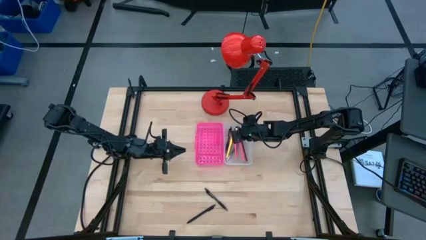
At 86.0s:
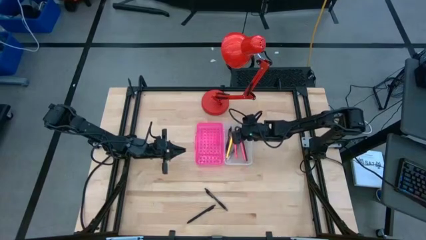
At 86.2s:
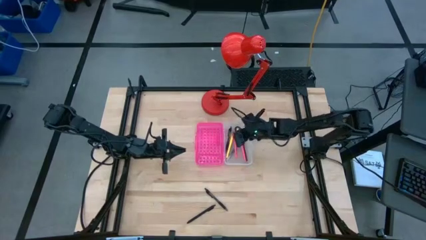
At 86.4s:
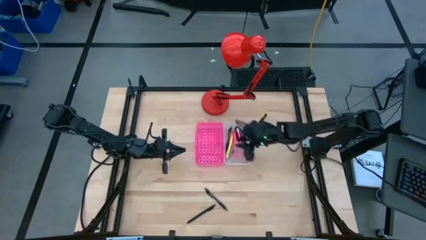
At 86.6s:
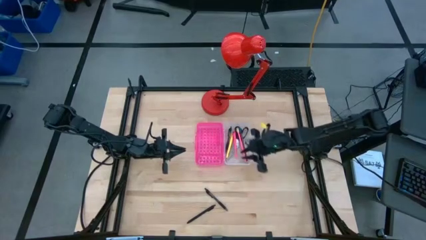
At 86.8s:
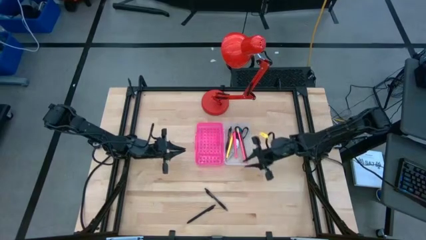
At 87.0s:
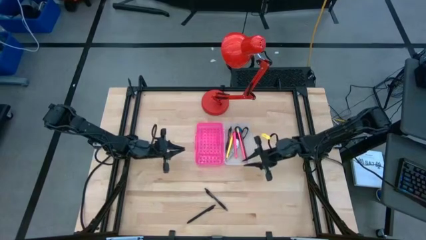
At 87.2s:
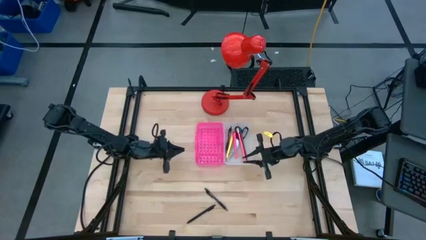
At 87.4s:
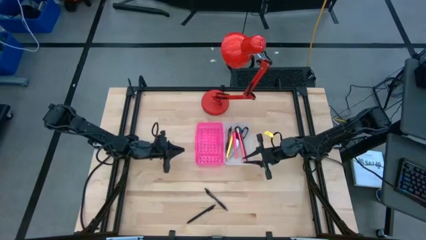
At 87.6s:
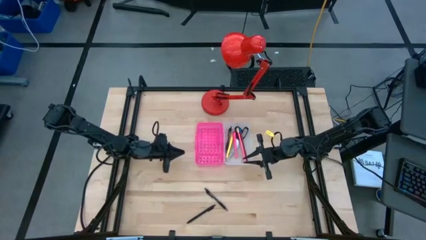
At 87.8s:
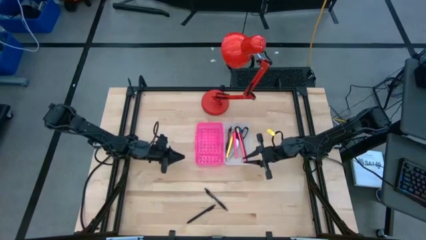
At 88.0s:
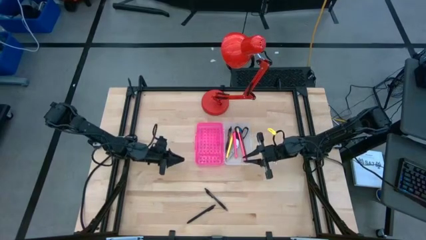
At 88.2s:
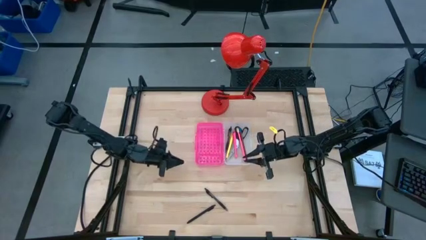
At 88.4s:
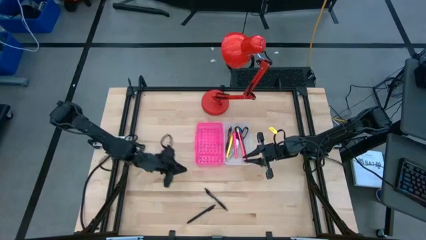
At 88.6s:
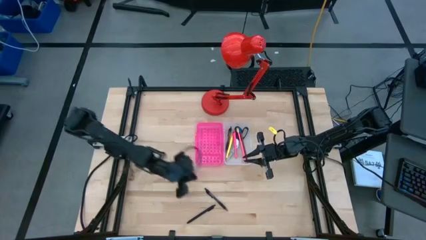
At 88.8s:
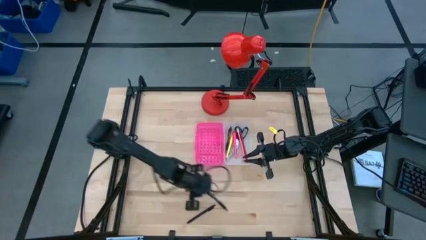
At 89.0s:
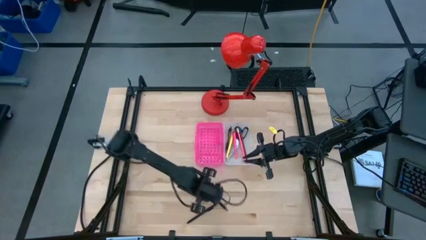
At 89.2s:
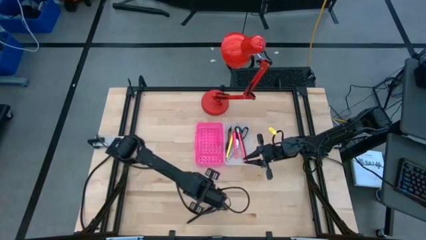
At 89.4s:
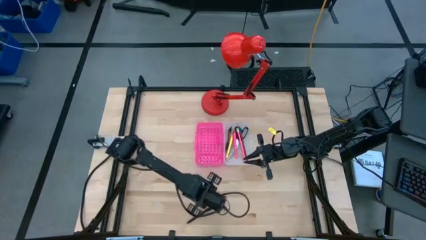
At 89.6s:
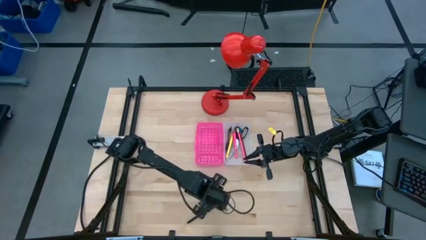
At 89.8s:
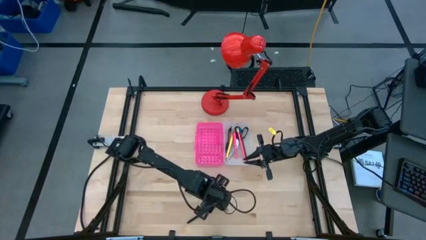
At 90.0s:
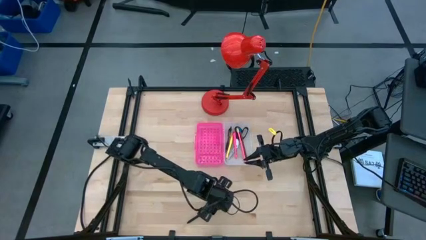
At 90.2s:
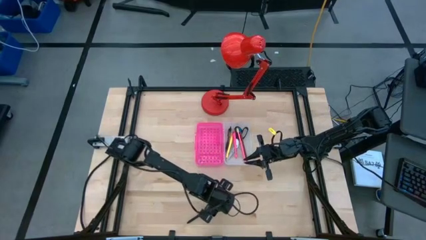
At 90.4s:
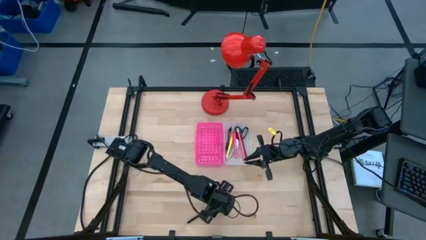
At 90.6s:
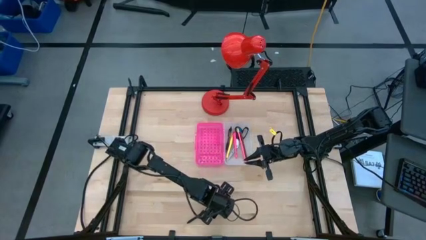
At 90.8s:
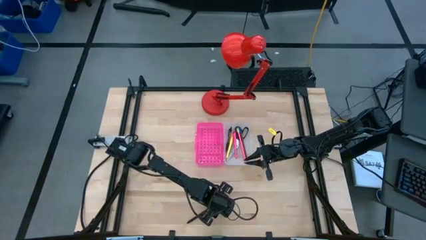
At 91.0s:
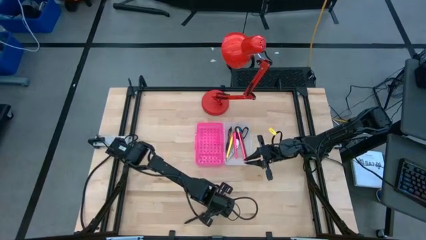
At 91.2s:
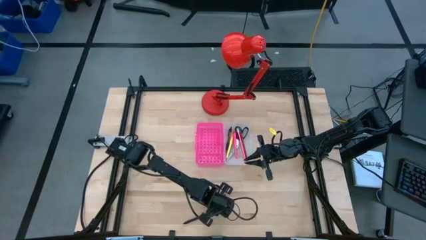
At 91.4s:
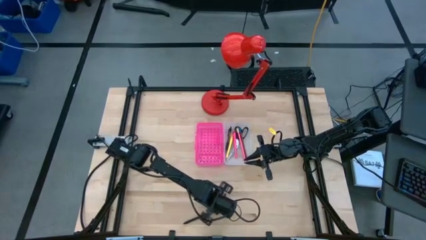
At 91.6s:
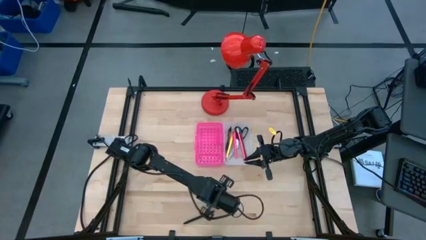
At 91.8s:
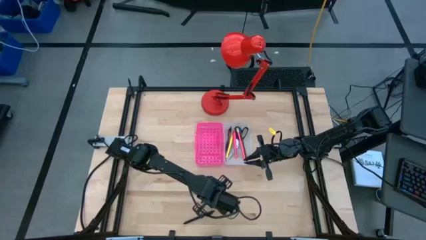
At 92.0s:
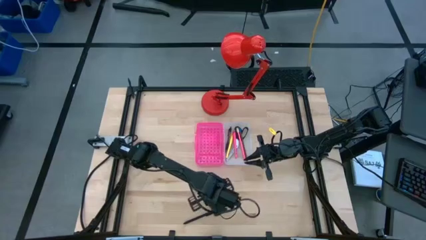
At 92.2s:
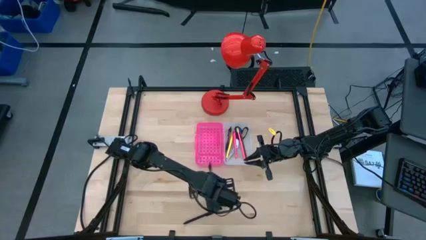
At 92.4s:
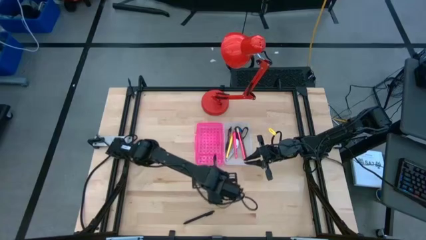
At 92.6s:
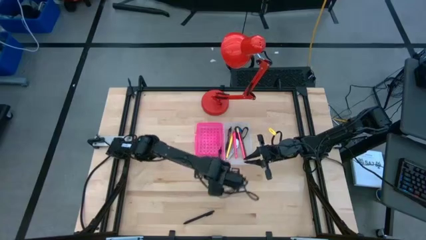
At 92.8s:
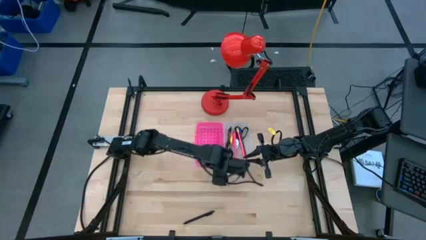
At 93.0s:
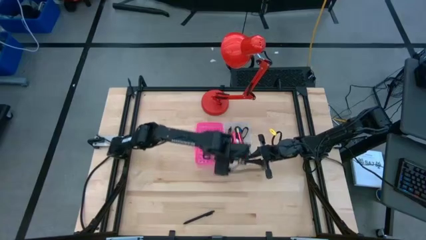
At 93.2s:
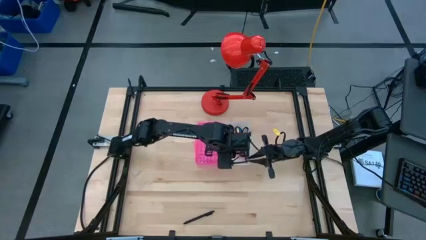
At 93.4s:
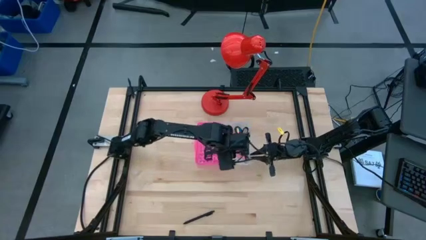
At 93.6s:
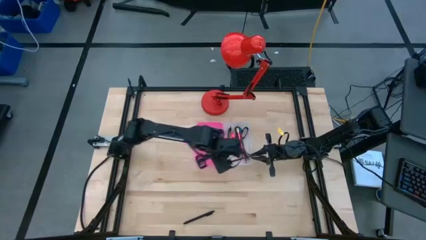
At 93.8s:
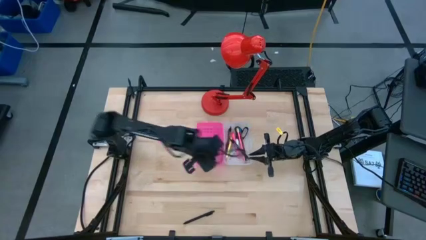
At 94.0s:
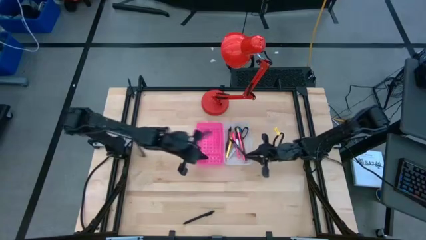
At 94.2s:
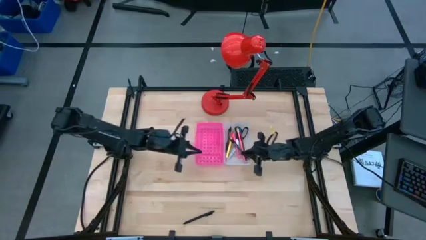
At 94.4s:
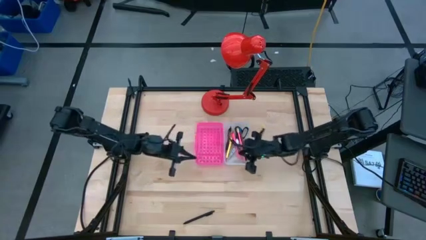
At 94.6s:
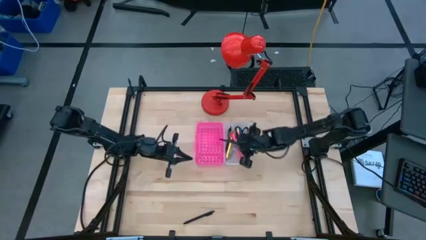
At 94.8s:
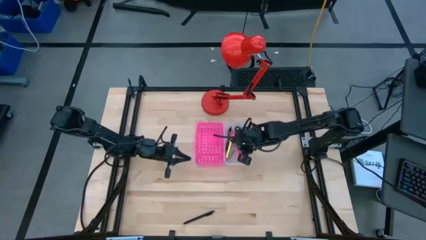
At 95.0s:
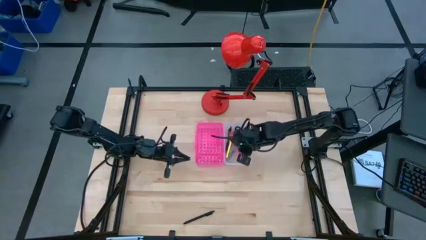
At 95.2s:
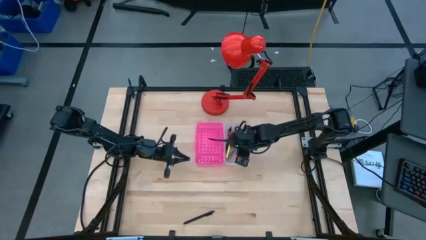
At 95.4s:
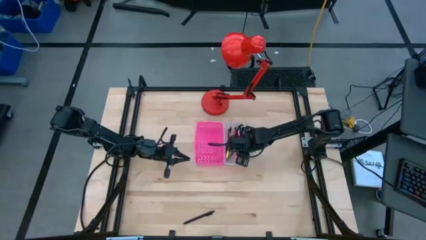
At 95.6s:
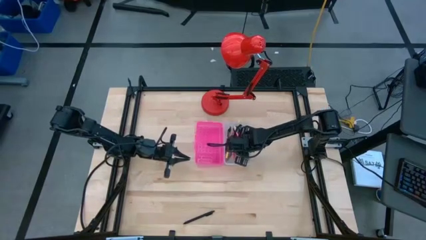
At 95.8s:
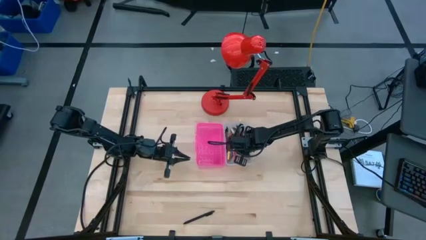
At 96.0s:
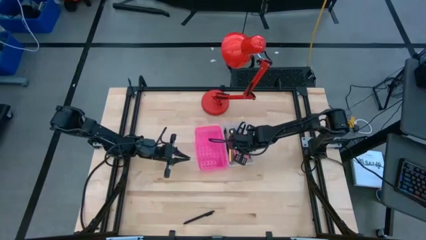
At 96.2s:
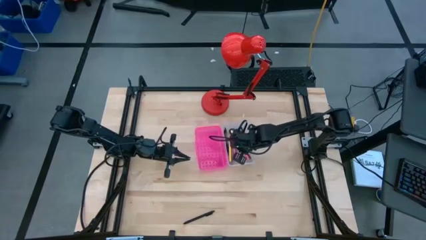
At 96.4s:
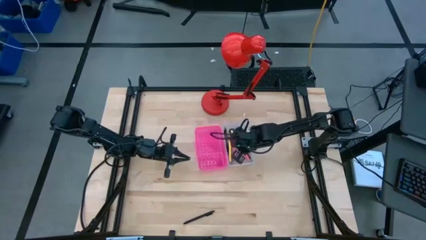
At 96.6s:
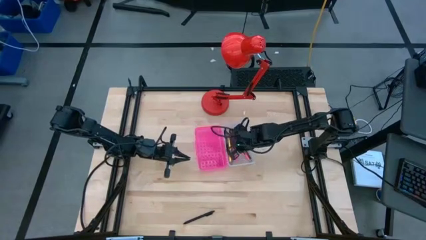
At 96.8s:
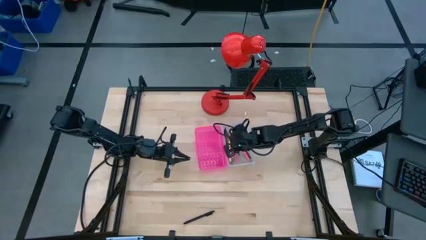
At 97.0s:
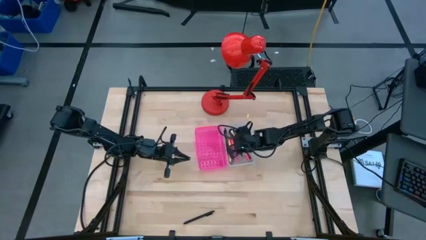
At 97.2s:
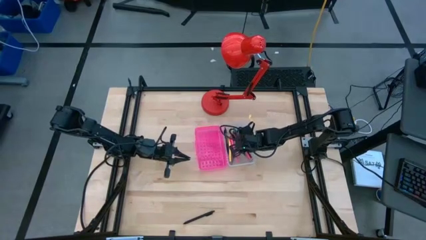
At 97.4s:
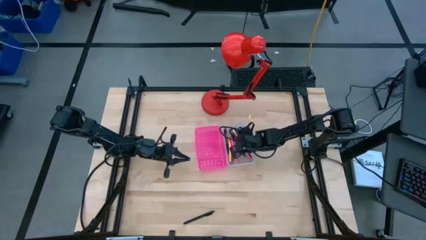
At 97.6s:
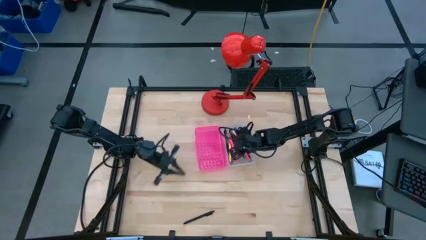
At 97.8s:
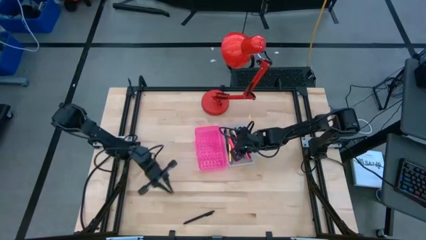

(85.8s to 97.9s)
Task: Pick & place school supplies into a supply box
Put the black transparent pen into the pink supply box

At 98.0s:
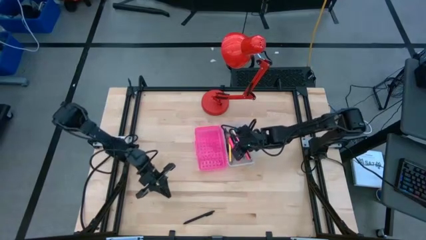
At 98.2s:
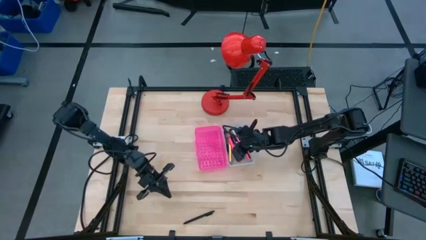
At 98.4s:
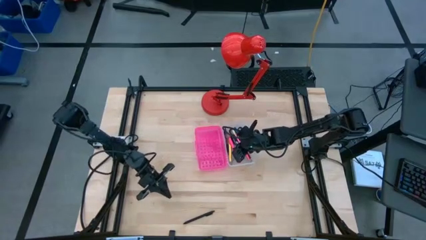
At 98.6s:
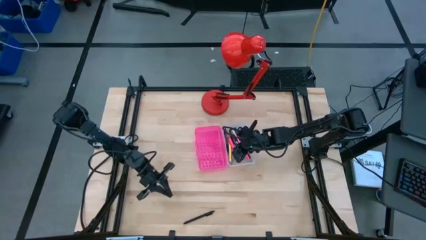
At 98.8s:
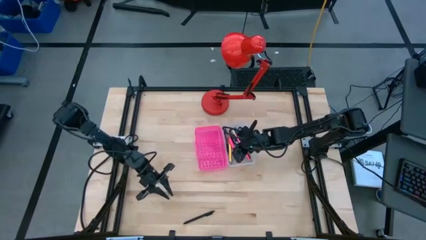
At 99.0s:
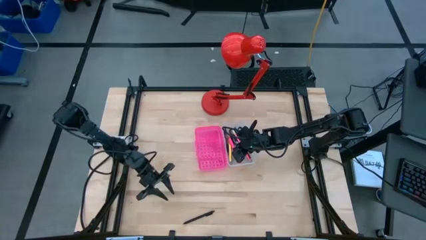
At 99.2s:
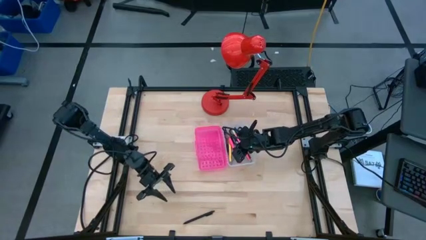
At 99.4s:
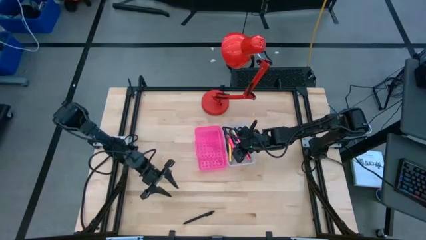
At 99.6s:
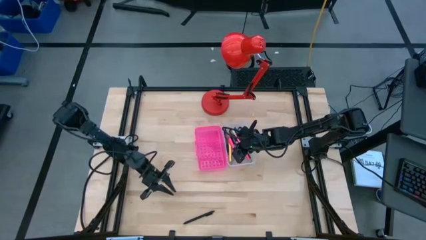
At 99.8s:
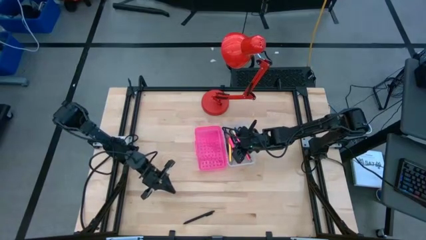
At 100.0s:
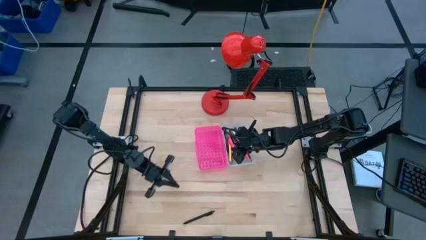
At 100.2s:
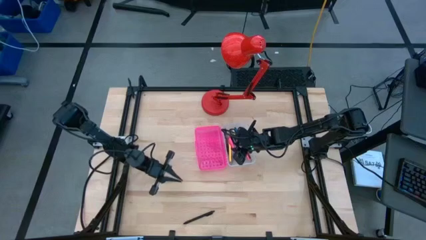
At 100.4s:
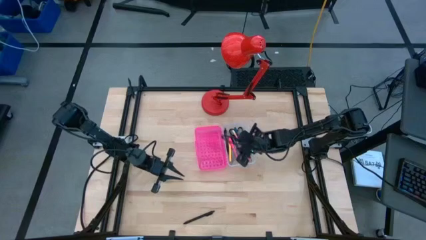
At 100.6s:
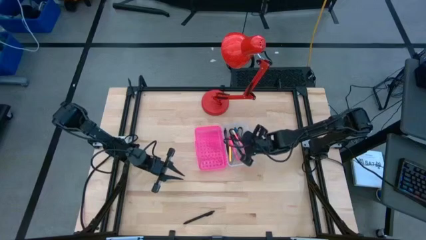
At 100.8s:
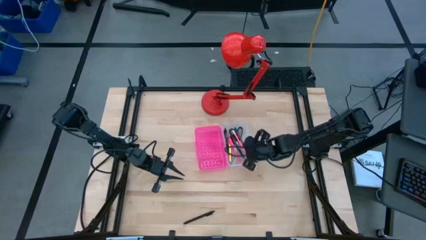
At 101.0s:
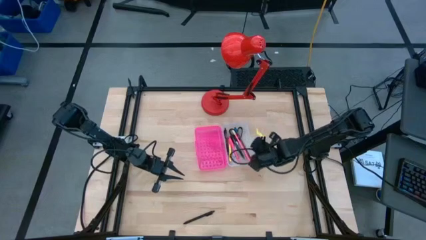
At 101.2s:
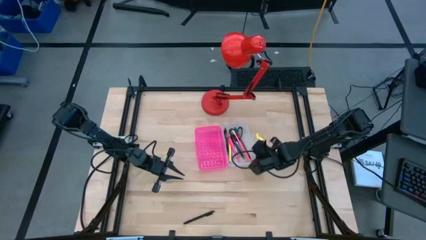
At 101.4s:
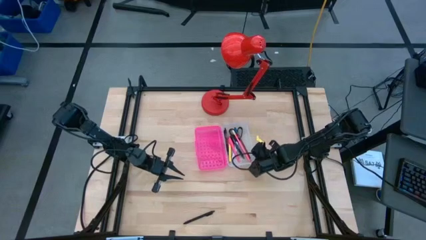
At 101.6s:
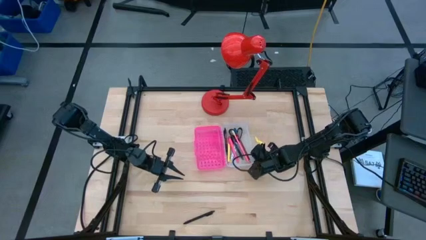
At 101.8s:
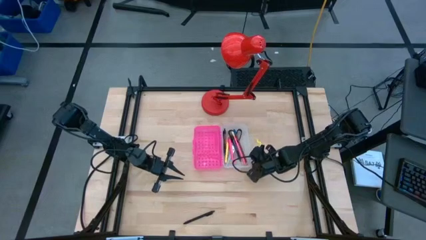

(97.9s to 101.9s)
Adjust the pink supply box
